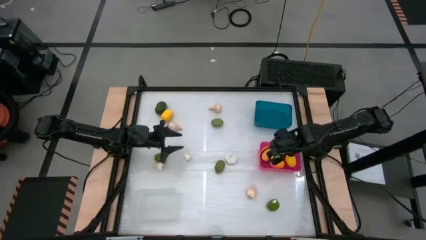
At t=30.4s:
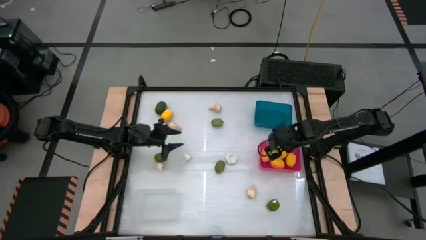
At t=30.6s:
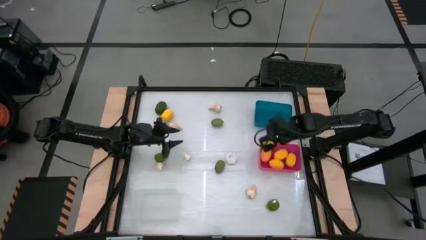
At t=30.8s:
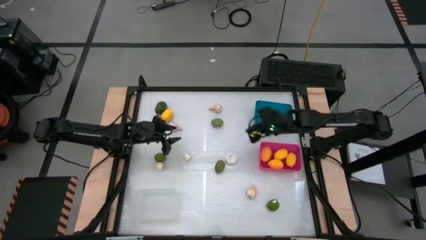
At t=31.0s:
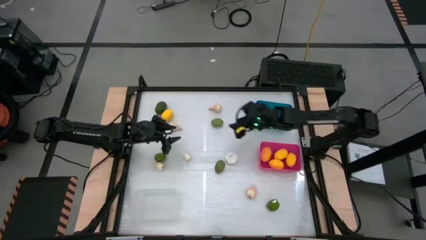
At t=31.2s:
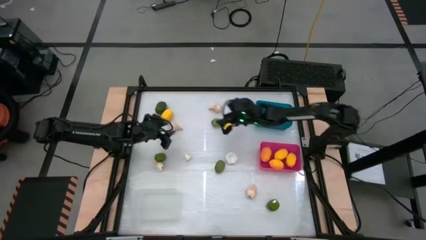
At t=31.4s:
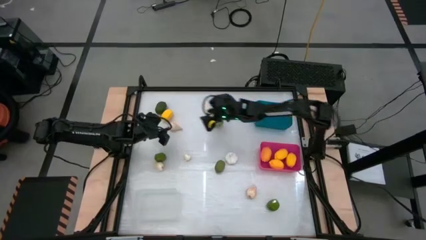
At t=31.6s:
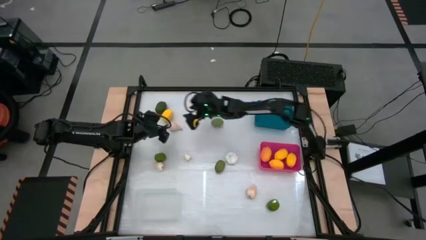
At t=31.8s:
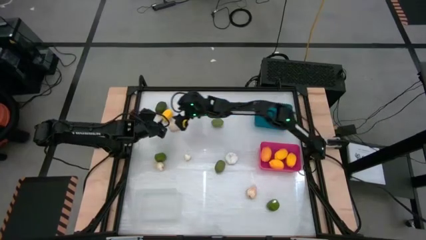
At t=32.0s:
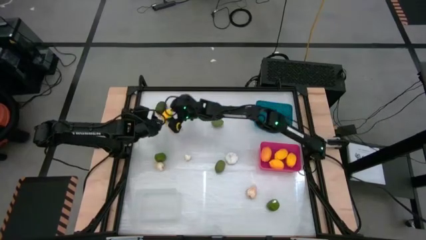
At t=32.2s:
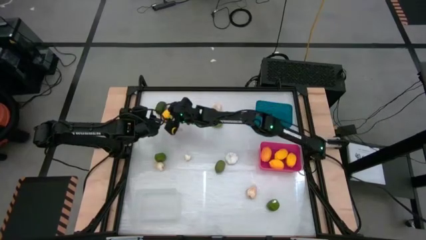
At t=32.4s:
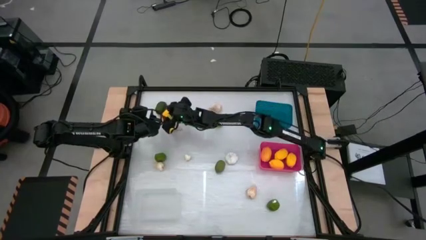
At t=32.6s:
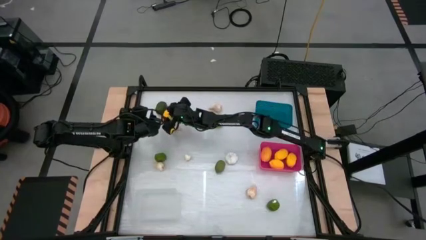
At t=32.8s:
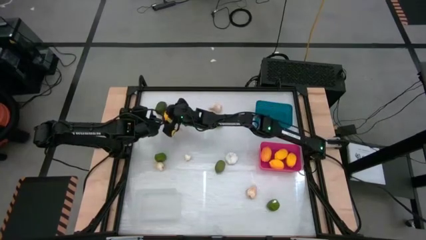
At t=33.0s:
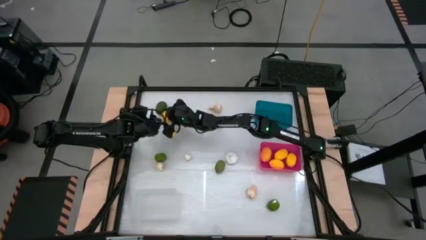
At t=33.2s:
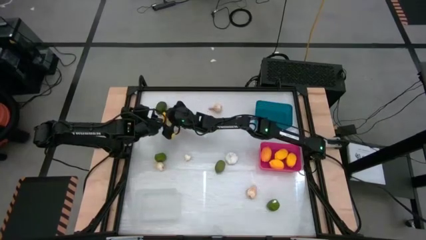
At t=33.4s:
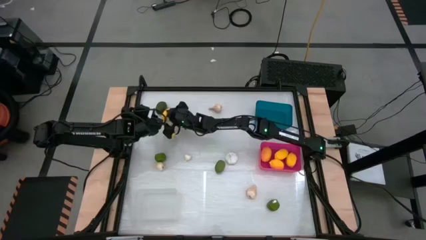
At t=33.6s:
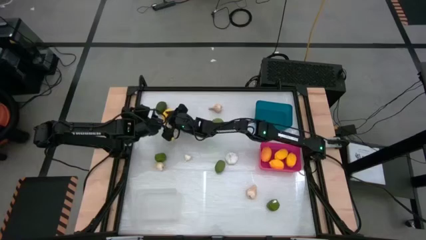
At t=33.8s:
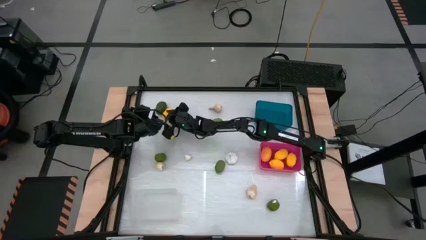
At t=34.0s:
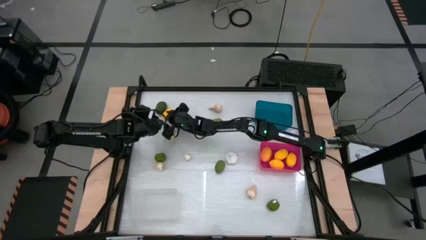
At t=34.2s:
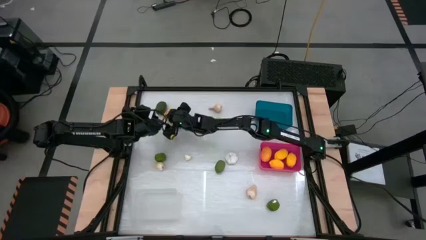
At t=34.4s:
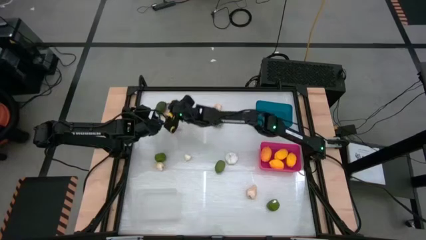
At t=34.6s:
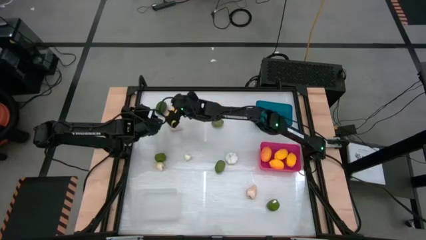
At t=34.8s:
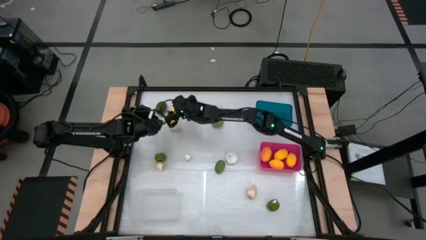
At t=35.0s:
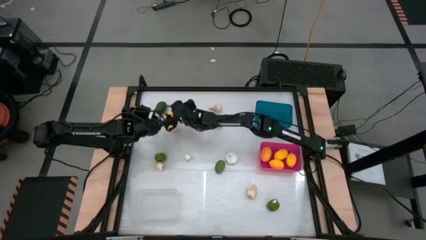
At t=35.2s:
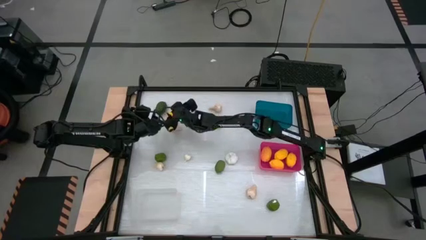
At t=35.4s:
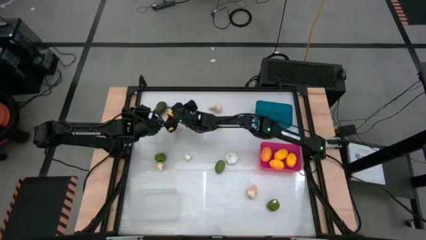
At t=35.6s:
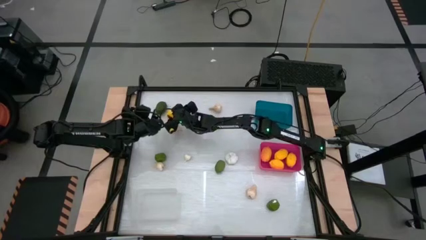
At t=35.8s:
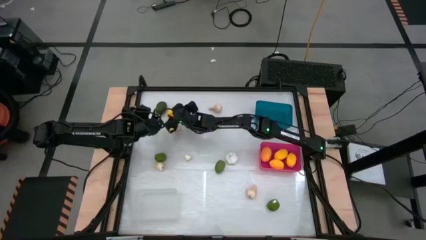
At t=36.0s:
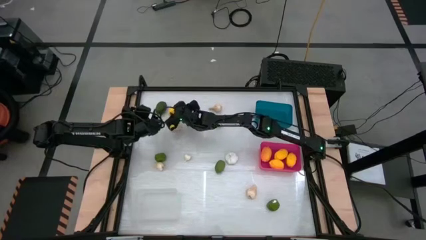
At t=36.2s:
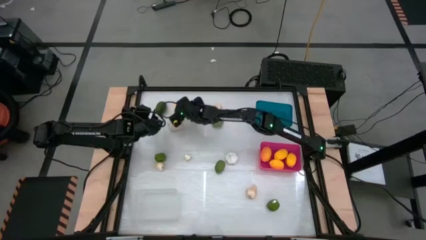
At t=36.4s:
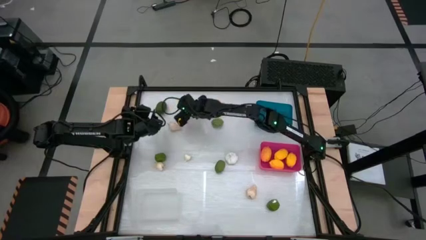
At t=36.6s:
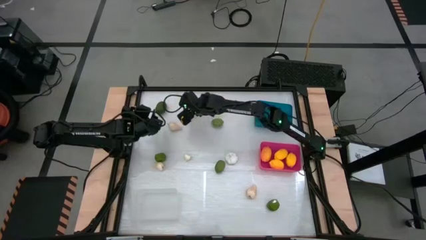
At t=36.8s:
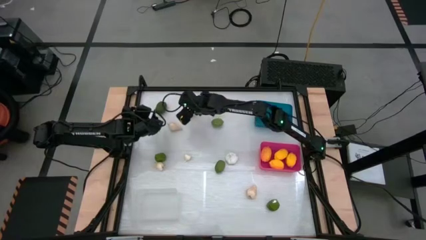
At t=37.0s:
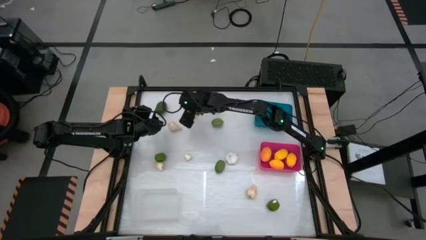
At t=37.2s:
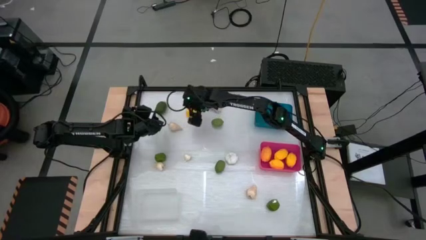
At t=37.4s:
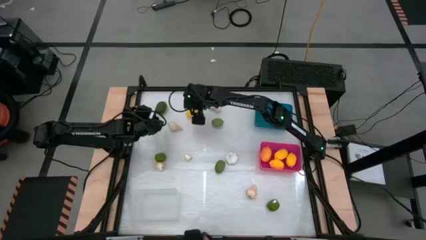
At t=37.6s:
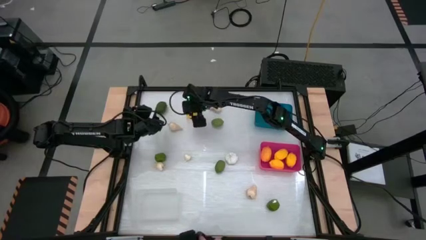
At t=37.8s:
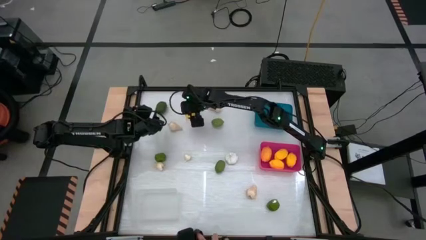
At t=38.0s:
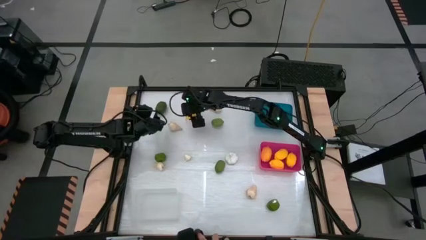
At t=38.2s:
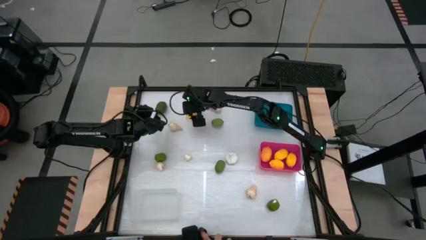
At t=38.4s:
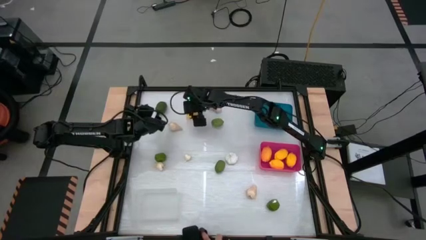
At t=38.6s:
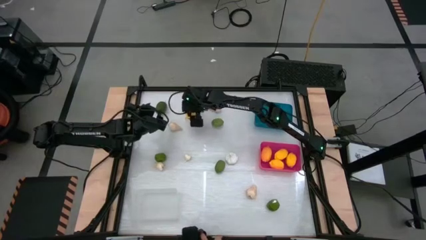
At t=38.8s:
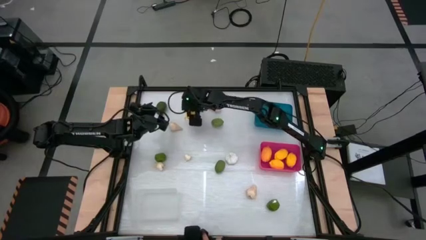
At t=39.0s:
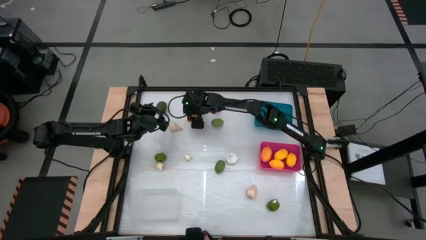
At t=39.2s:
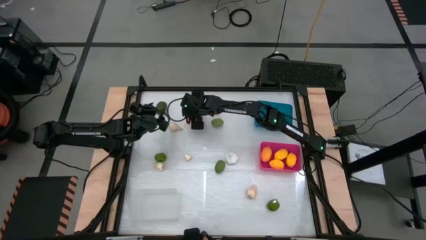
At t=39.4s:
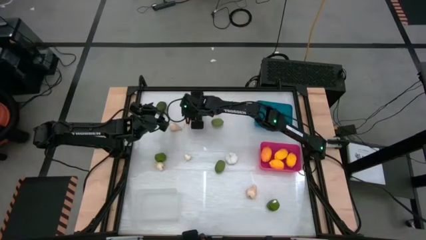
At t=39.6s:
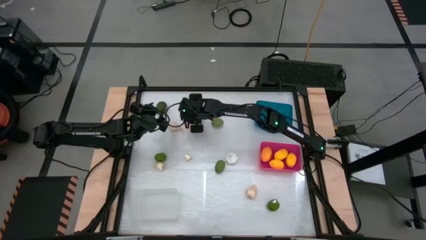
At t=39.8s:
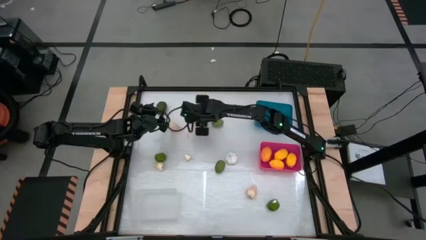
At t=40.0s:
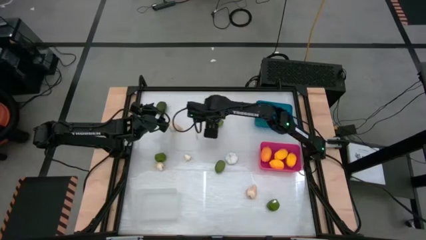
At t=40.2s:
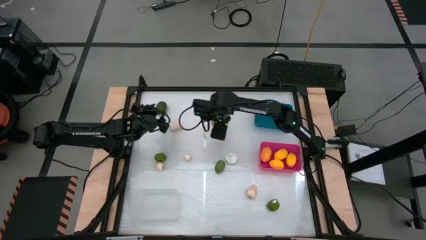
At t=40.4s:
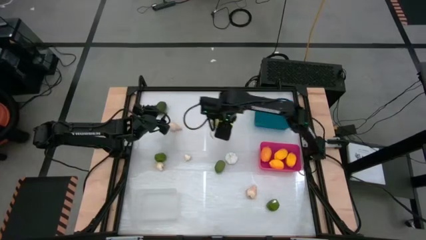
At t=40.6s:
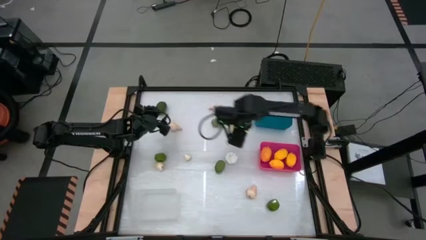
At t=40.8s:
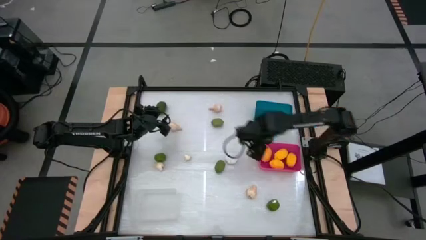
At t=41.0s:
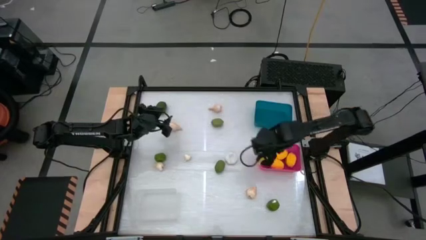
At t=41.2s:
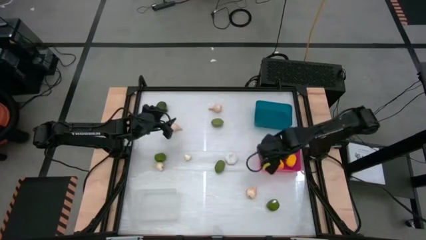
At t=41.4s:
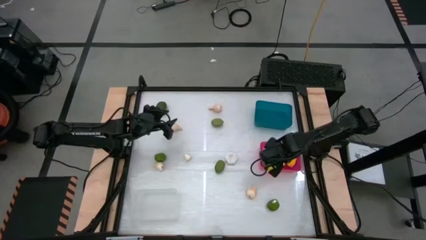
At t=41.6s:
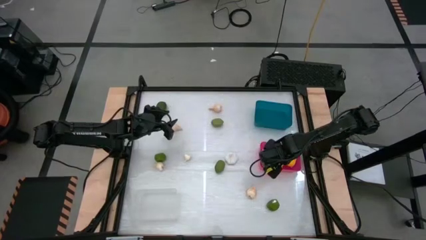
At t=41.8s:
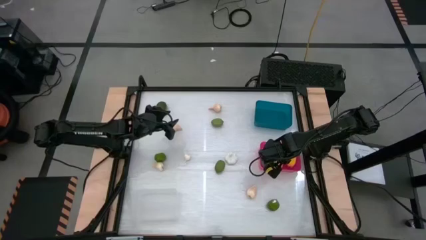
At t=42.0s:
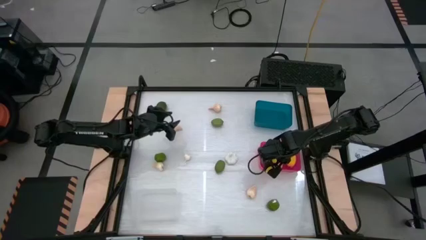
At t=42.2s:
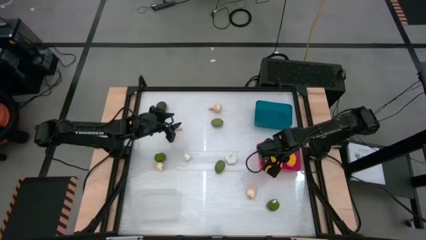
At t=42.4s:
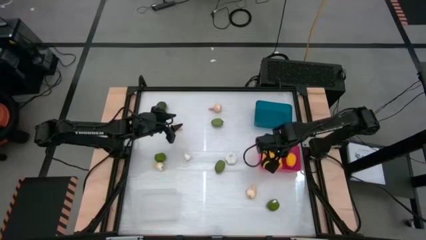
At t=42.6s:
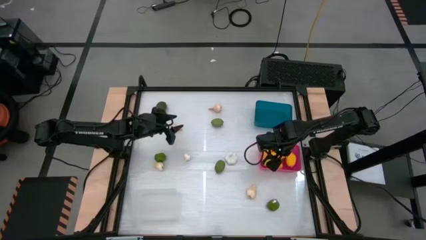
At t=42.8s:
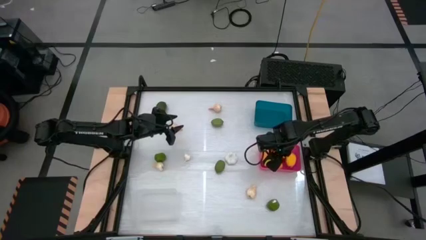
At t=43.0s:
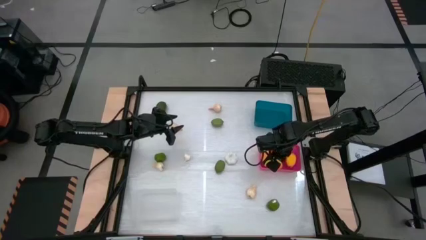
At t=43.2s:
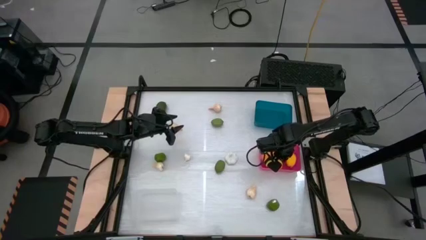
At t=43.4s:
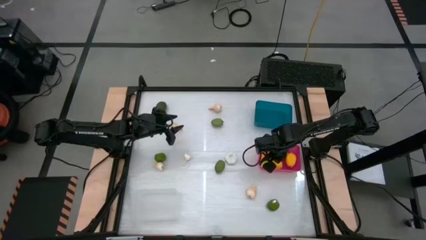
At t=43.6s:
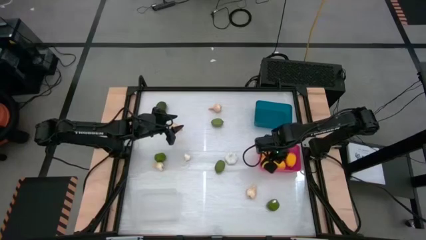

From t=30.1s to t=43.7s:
Task: Sort produce into baskets
Put the yellow lemon into the pink bin

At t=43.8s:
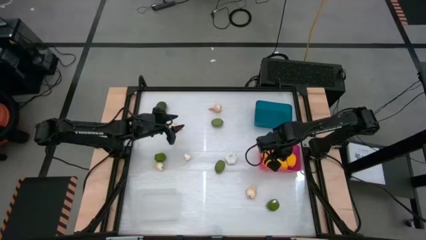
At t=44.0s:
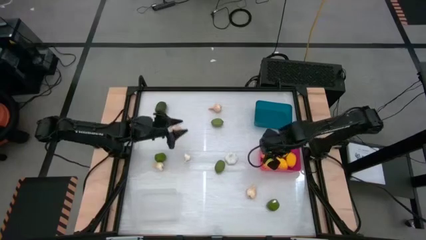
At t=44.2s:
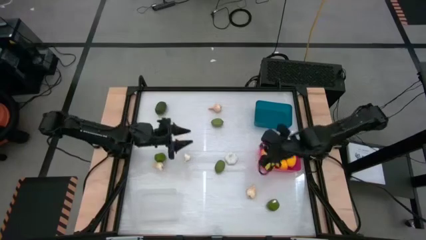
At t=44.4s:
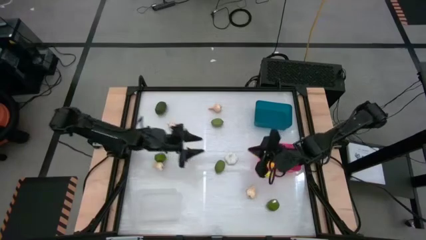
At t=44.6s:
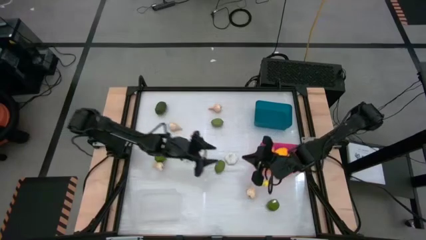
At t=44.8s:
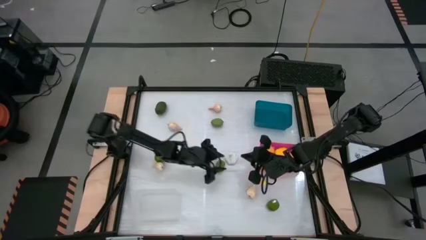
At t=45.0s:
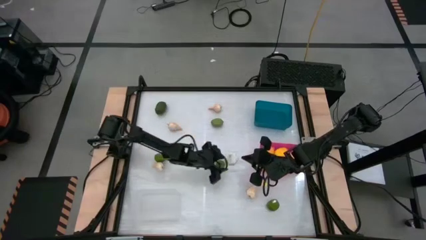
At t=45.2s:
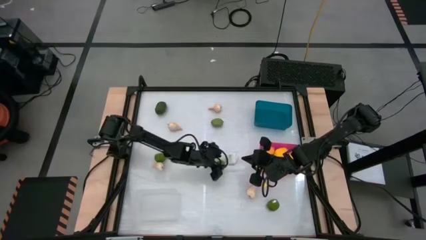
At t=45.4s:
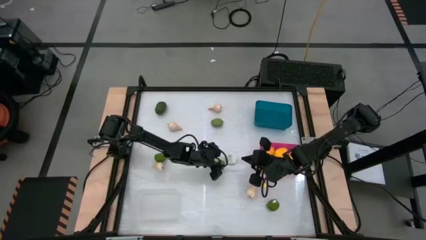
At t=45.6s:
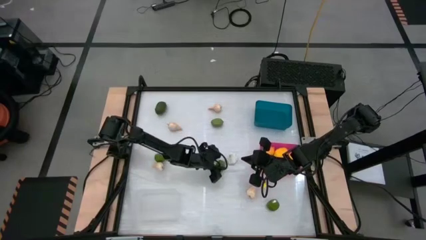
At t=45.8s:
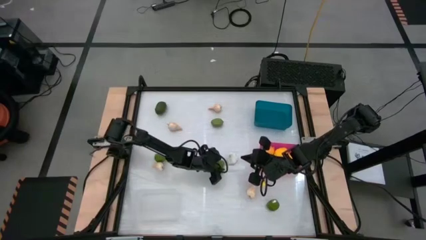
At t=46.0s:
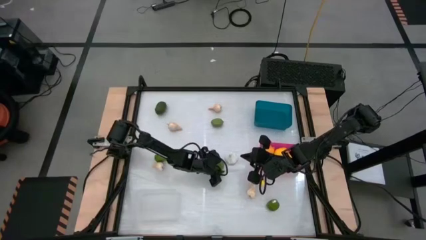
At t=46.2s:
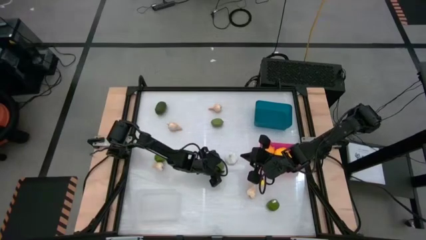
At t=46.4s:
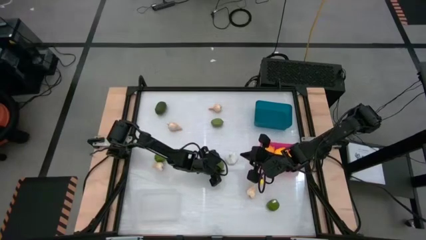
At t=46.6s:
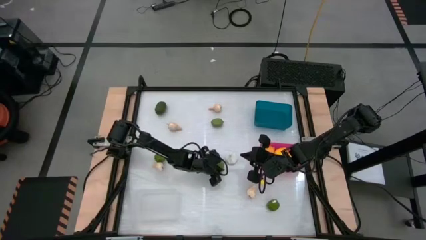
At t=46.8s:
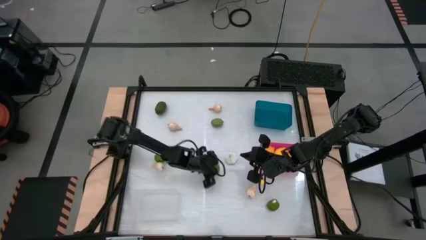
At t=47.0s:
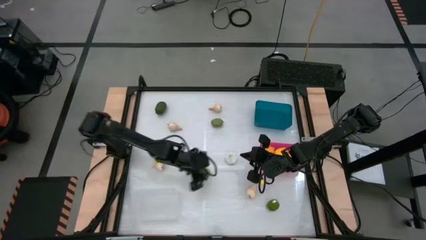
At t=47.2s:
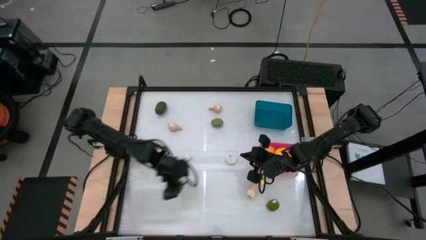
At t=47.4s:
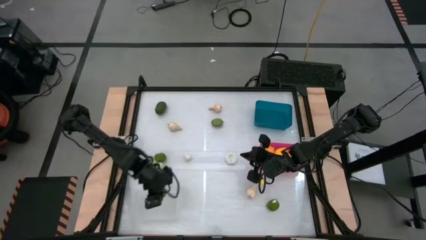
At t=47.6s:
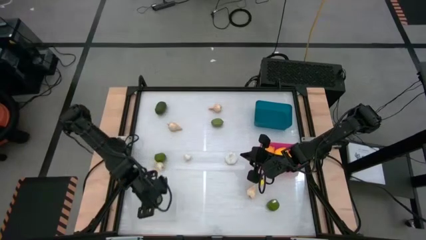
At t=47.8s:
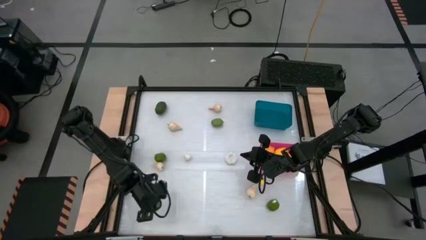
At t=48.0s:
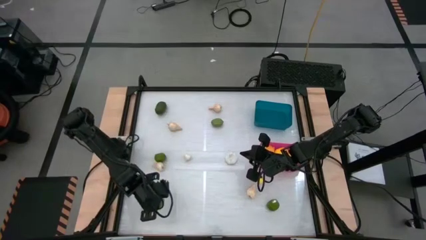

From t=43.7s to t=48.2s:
Put the green lime into the transparent bin
